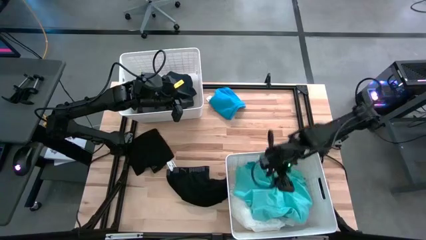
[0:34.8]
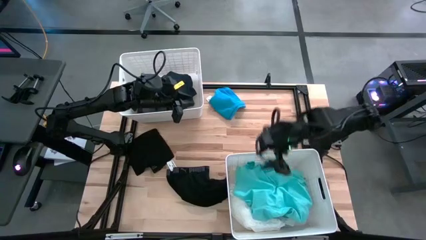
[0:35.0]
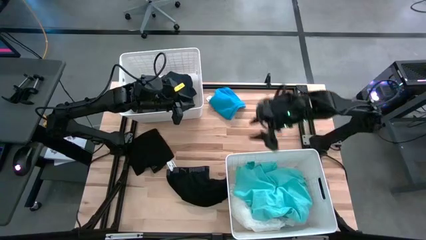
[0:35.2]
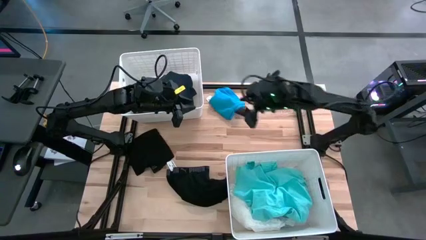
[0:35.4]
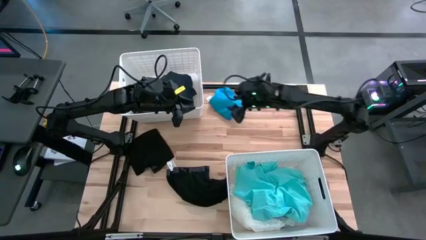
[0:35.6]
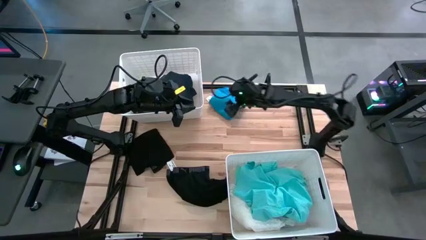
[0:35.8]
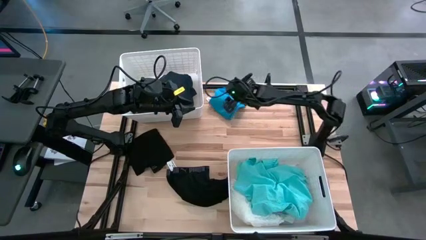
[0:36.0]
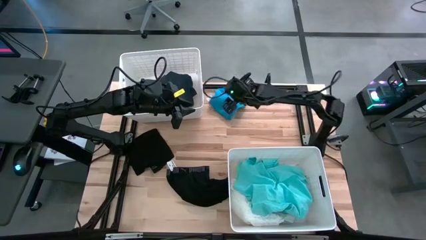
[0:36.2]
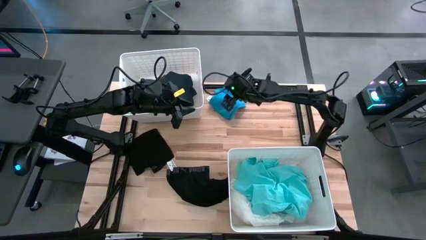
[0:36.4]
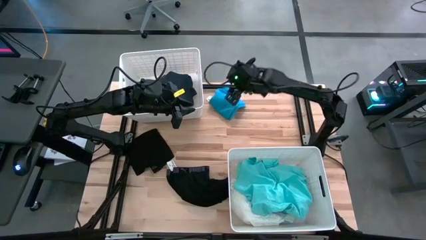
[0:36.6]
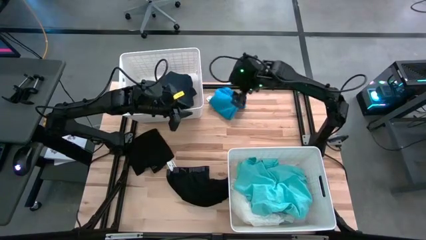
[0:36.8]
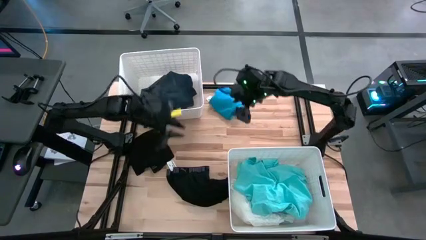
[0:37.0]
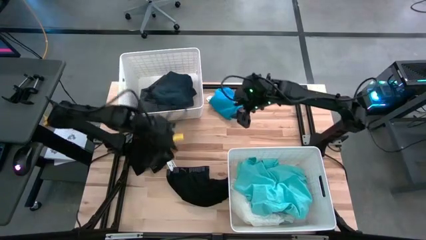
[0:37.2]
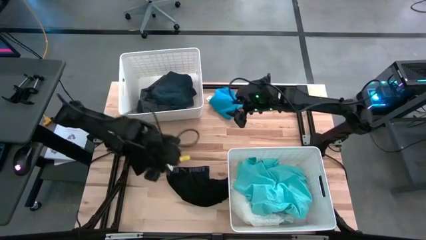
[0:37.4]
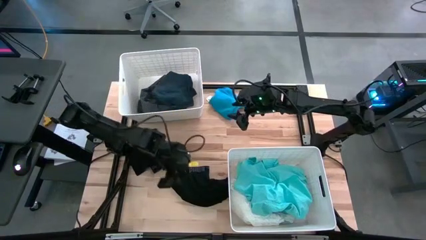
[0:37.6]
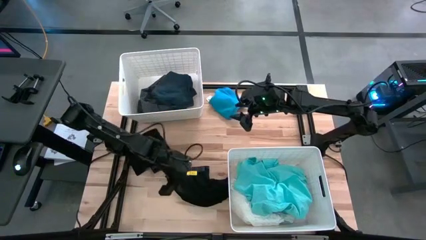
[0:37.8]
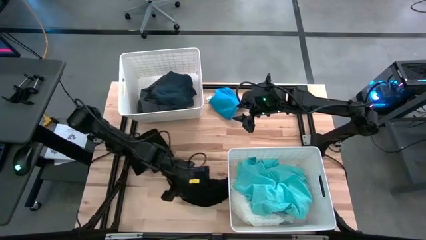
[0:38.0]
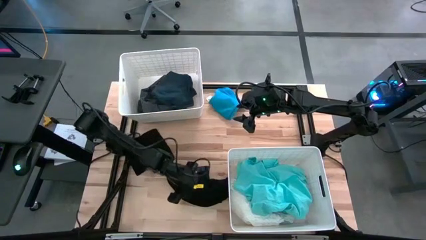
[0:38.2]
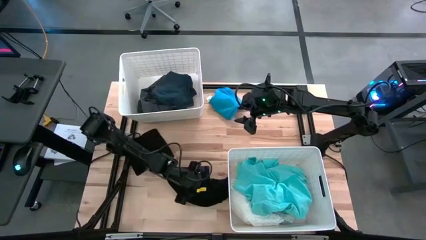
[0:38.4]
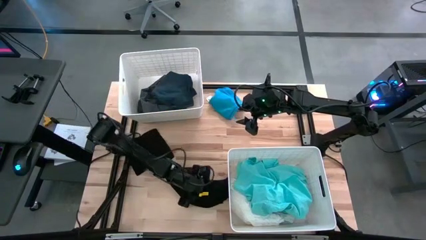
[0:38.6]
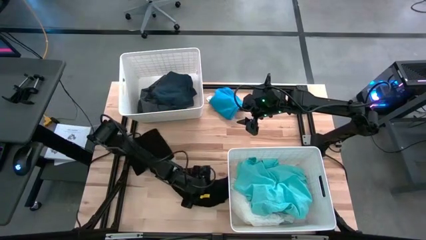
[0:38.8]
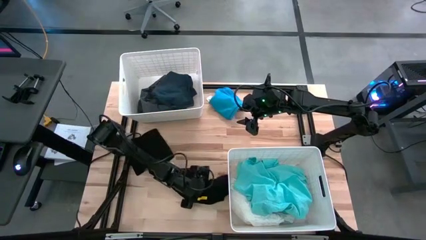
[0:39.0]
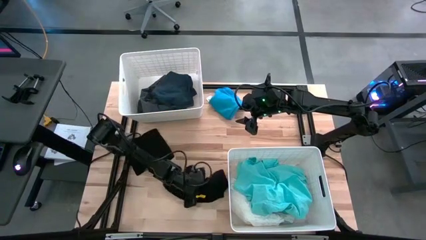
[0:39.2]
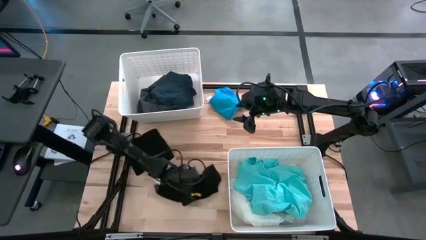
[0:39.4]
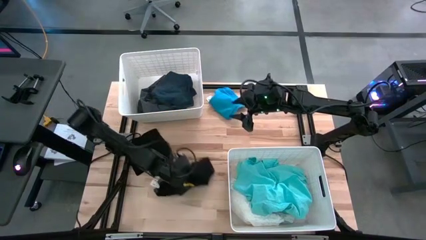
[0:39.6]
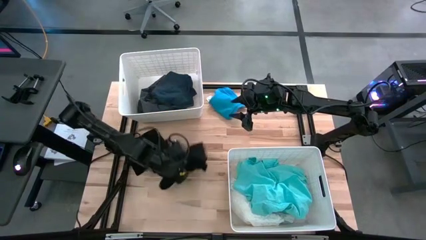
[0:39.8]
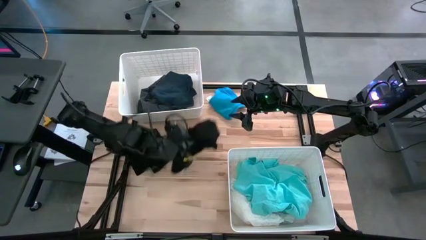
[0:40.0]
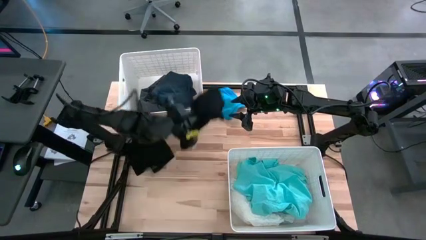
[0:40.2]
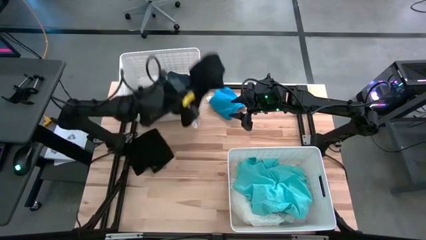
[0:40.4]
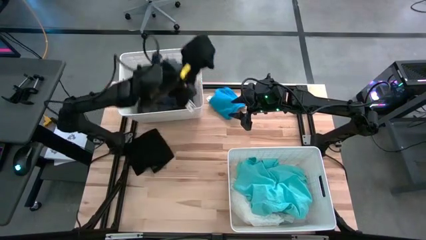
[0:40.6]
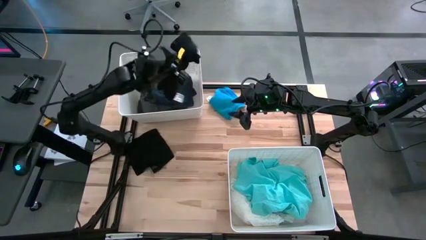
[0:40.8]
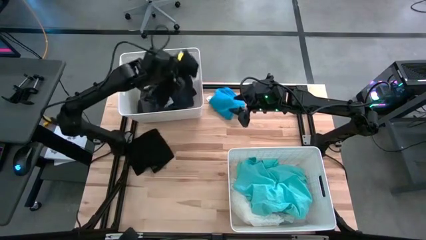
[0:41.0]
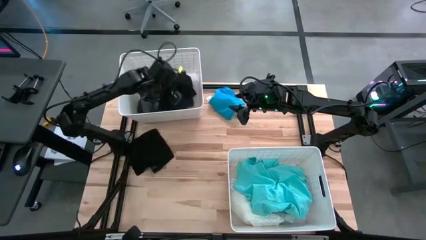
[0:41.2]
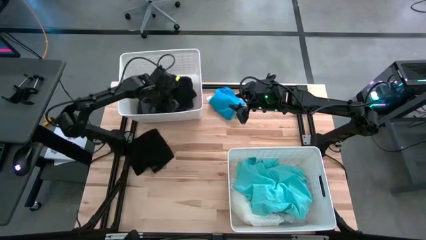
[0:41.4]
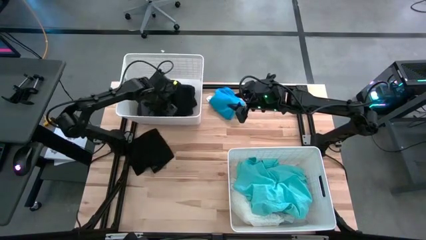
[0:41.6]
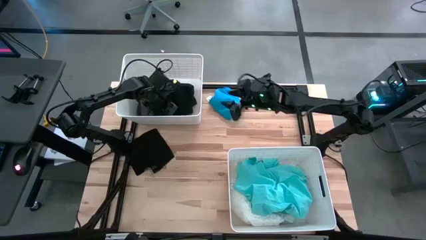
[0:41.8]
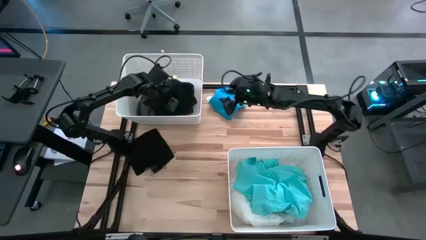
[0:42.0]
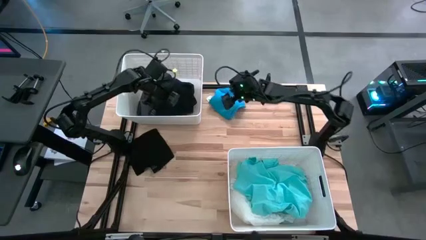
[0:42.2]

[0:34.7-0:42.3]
Task: Sort clothes
Put the black boxer short into the top white bin

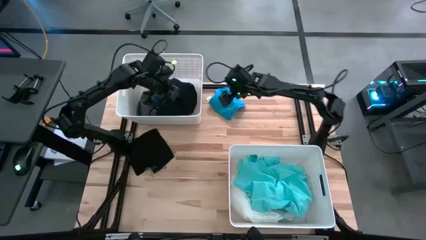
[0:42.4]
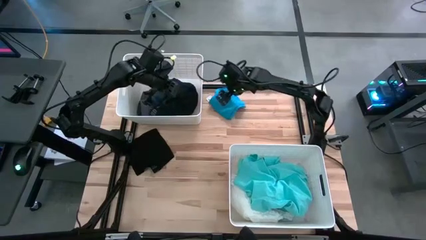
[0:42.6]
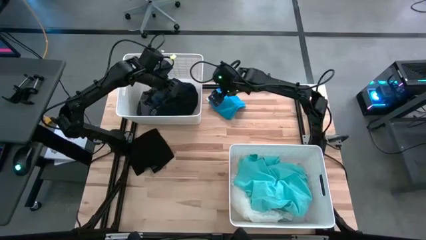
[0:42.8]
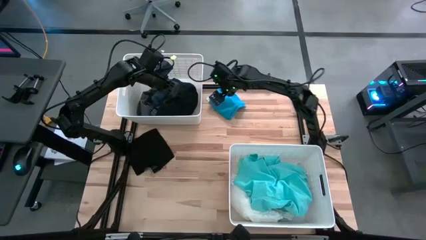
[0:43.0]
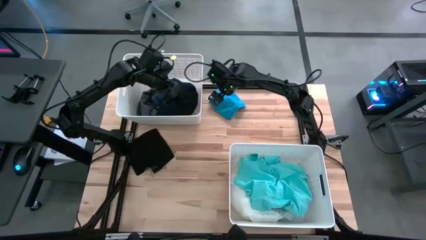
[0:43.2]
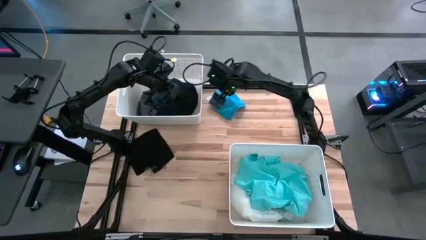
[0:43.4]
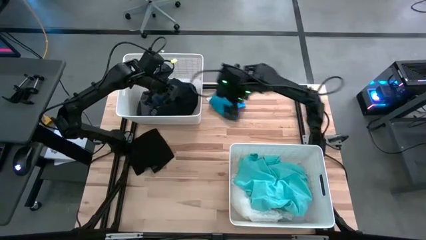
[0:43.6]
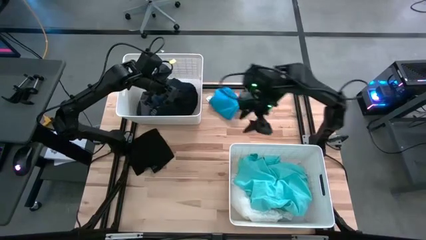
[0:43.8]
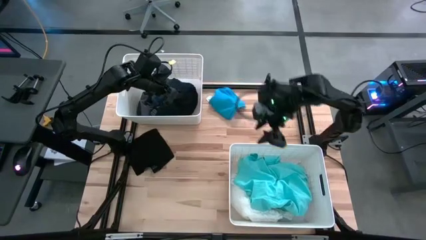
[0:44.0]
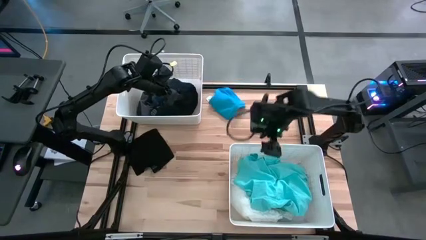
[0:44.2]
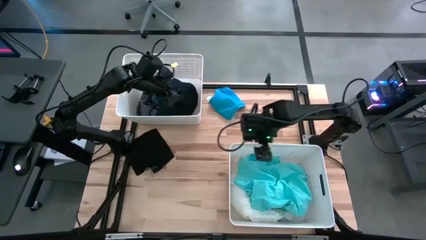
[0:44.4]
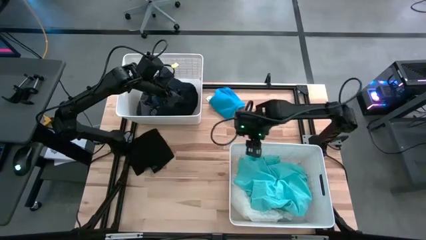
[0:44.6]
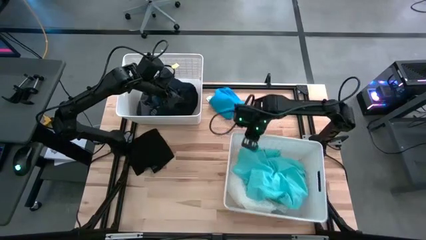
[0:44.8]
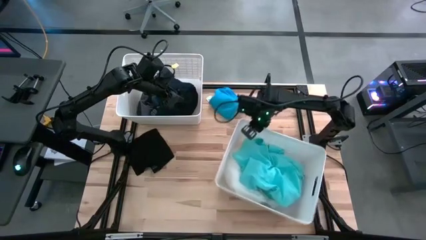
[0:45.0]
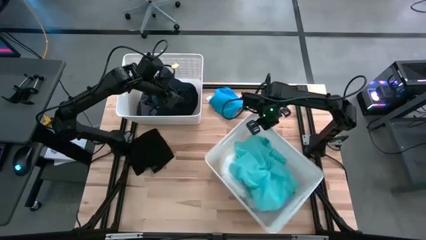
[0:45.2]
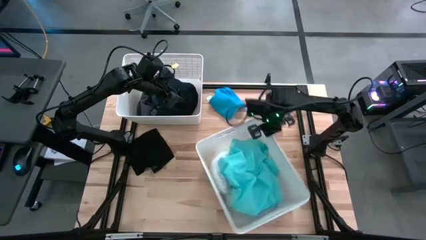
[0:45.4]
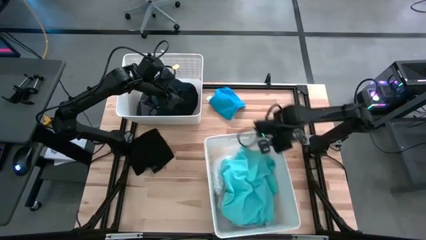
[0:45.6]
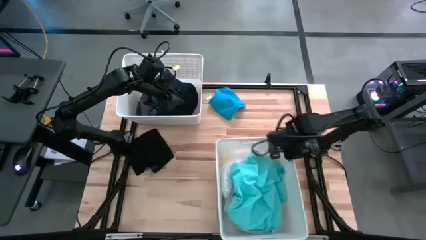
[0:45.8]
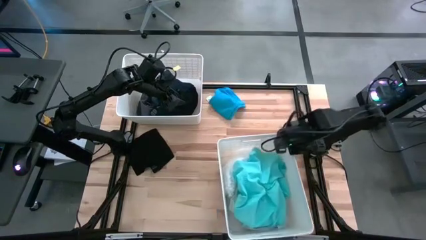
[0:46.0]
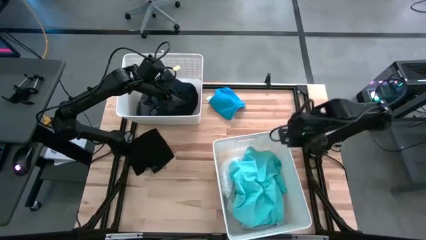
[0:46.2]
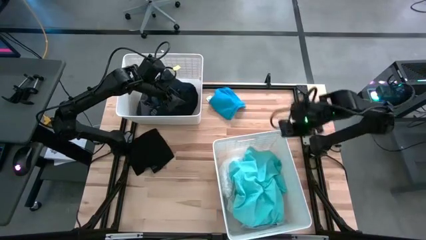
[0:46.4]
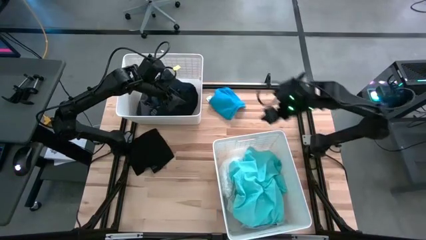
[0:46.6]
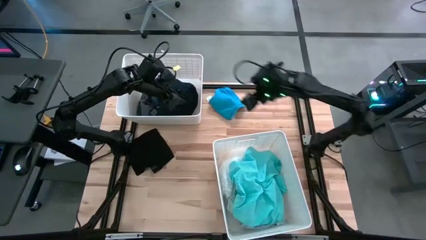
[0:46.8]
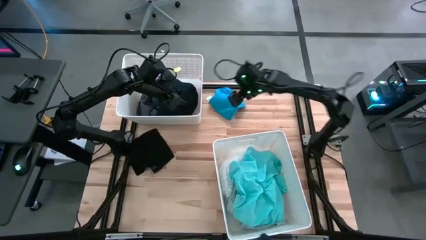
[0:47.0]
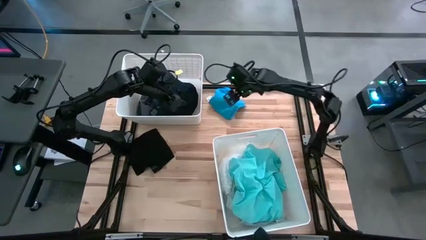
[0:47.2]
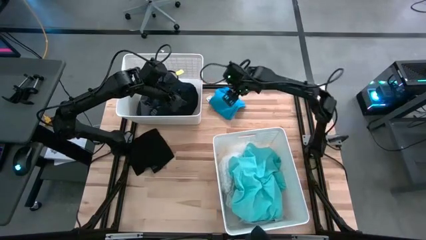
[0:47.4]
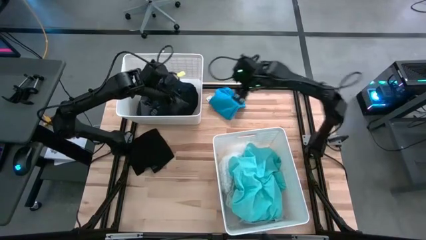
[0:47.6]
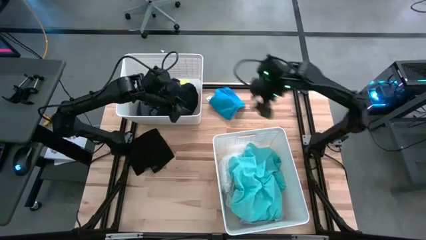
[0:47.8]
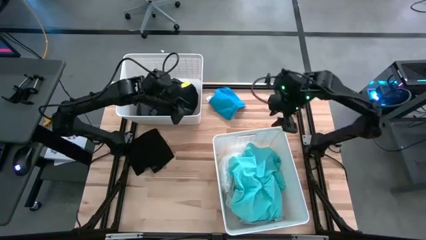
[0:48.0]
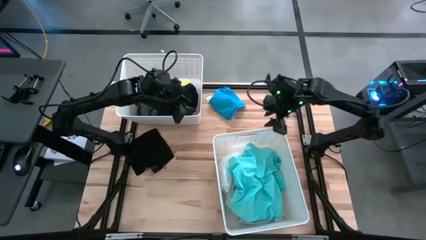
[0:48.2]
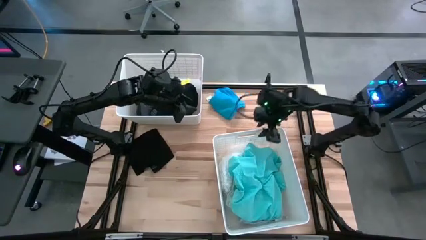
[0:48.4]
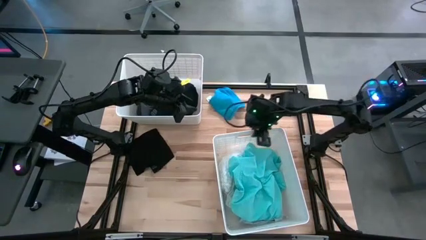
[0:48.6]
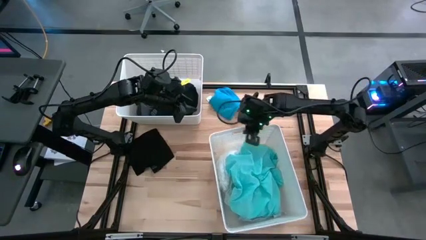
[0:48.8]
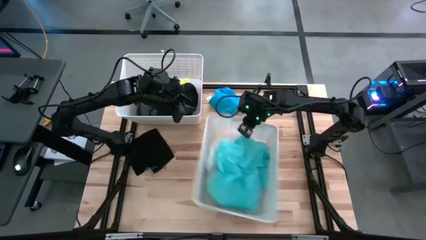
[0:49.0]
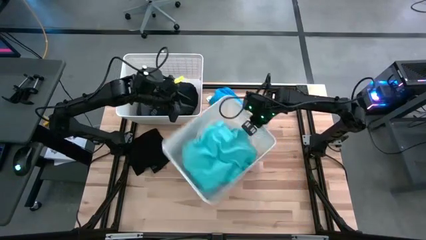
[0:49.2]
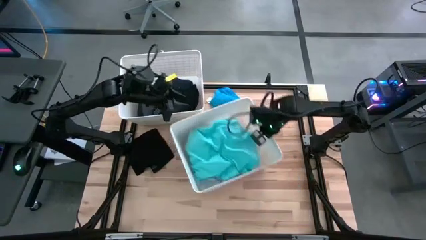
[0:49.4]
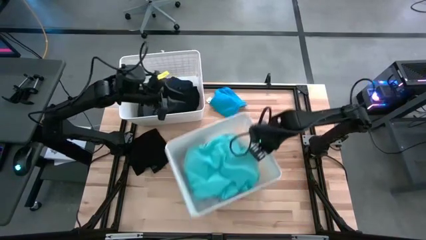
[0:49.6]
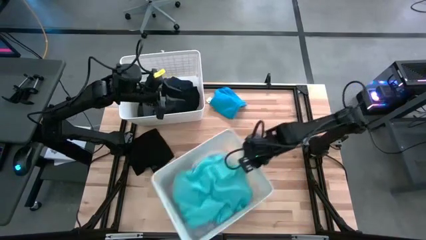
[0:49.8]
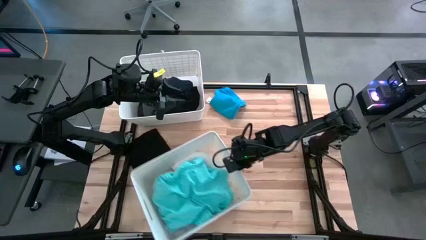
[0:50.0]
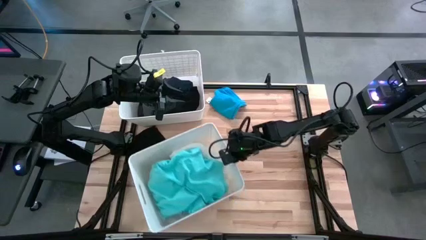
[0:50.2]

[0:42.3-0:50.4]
Move the bottom white bin

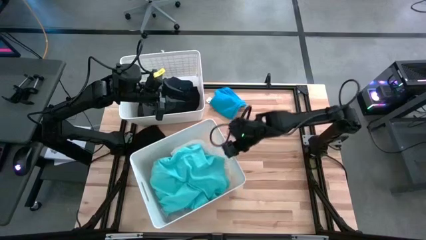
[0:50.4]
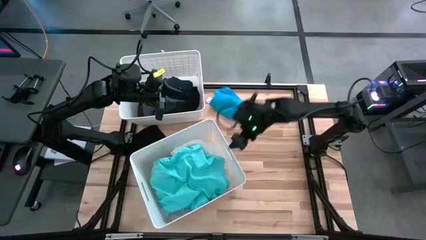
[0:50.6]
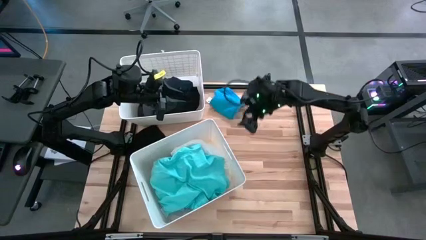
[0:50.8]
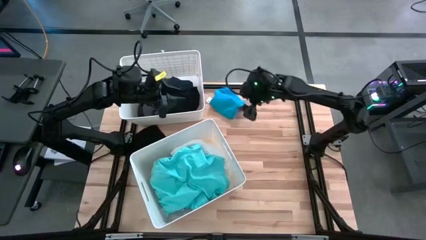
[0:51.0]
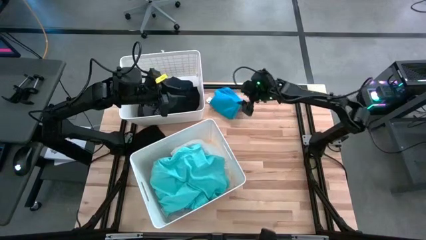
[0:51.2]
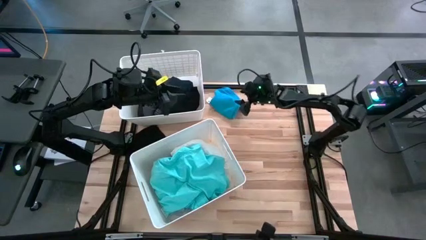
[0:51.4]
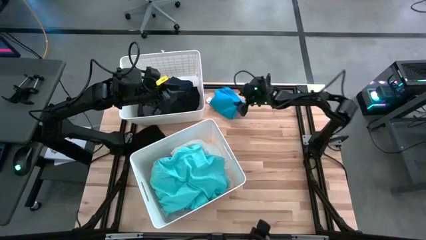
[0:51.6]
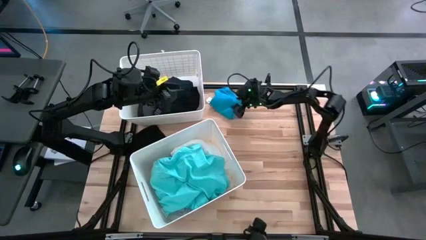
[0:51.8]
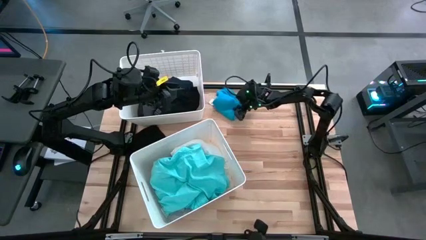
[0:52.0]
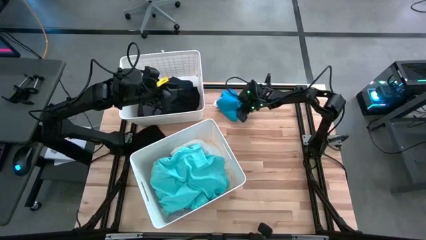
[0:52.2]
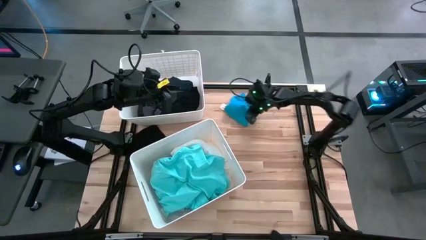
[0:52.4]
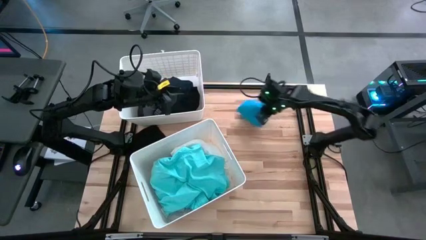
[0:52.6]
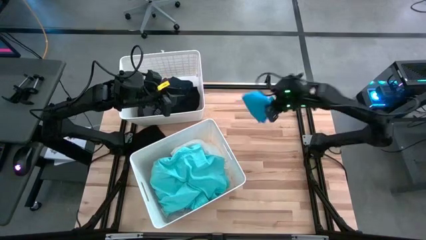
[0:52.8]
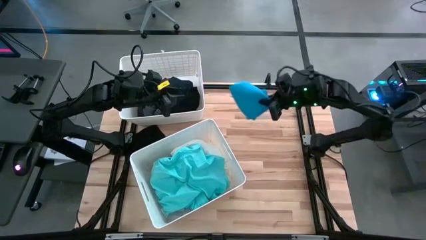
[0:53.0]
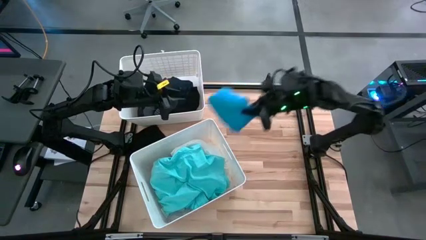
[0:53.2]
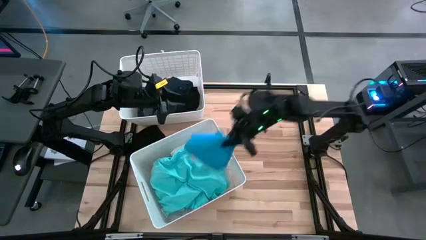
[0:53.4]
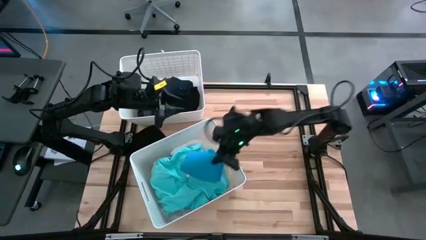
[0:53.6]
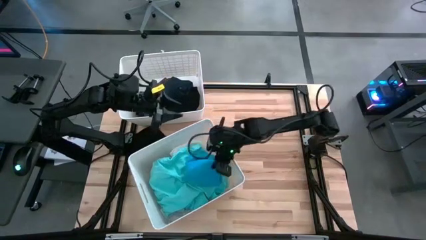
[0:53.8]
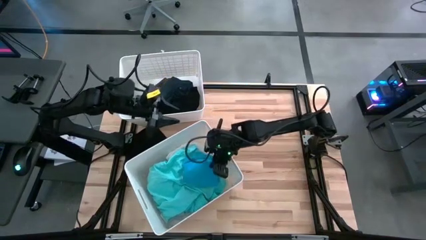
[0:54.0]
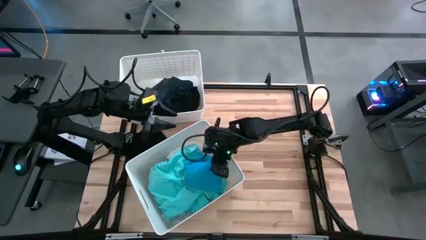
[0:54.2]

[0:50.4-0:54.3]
Put the blue shirt into the bottom white bin
